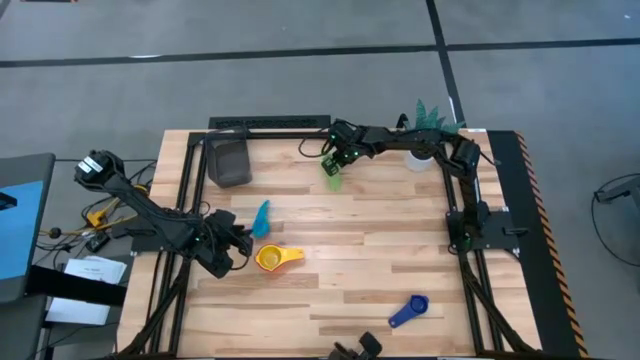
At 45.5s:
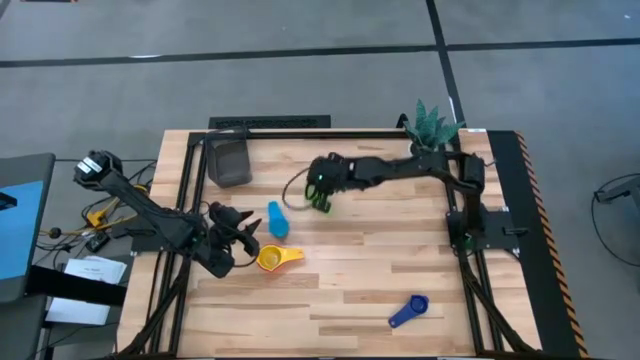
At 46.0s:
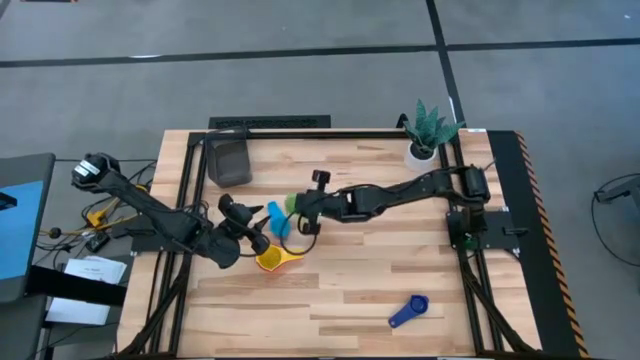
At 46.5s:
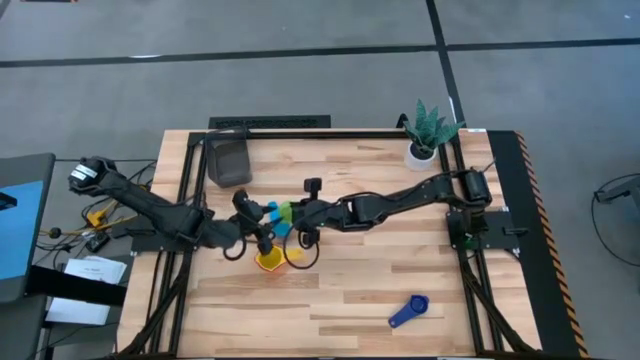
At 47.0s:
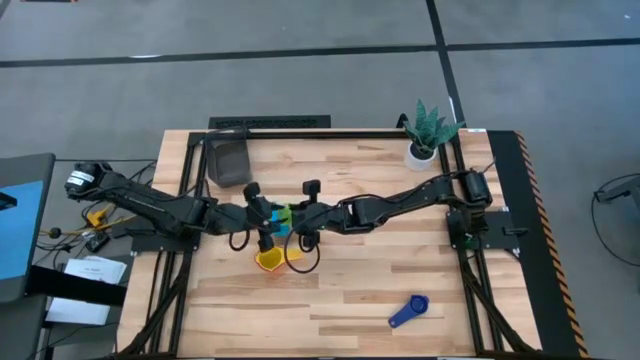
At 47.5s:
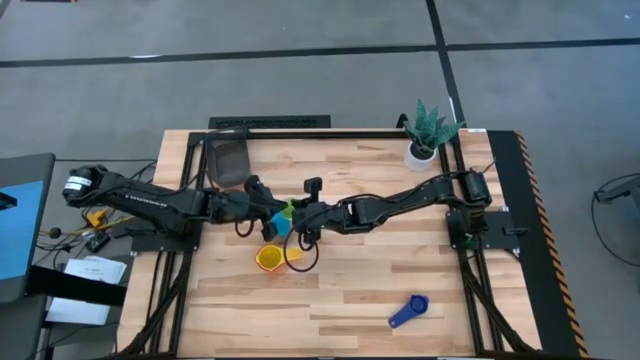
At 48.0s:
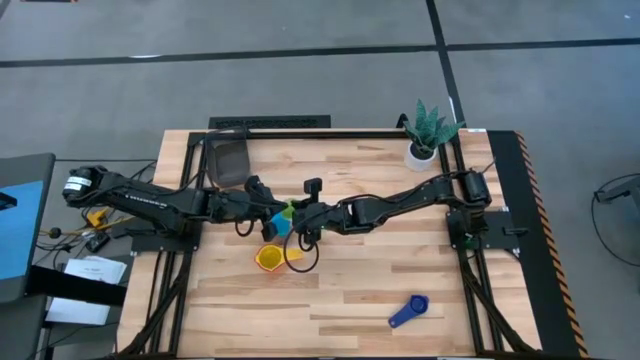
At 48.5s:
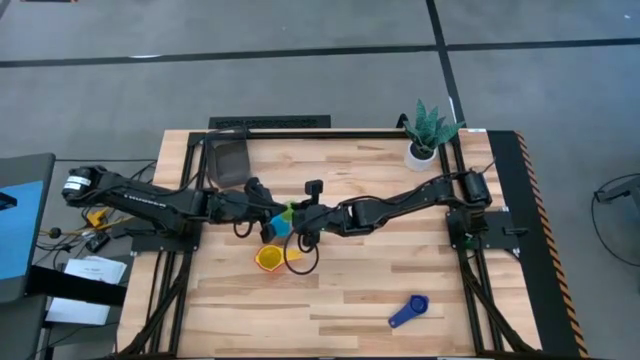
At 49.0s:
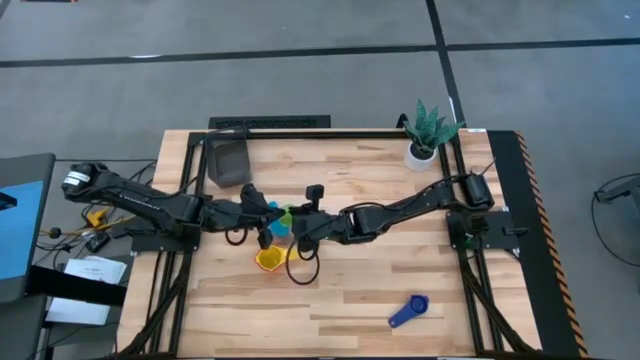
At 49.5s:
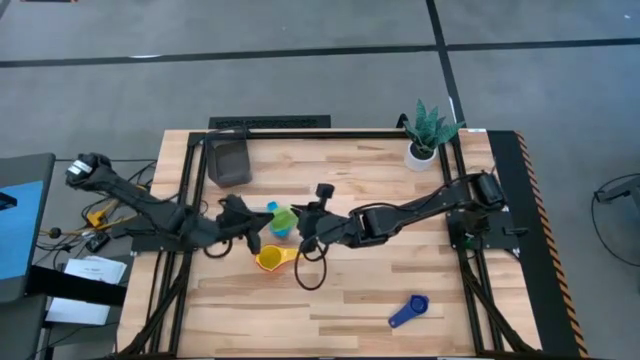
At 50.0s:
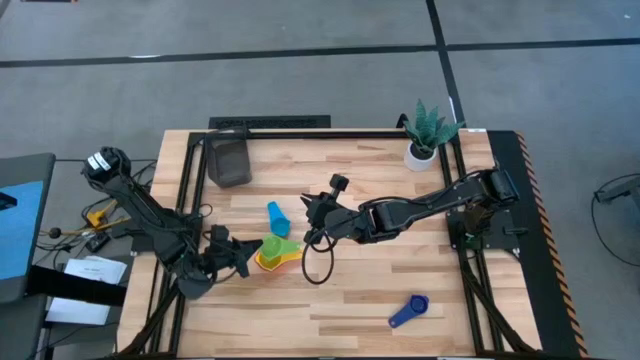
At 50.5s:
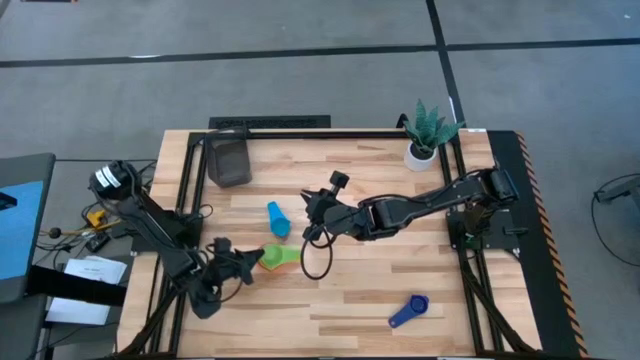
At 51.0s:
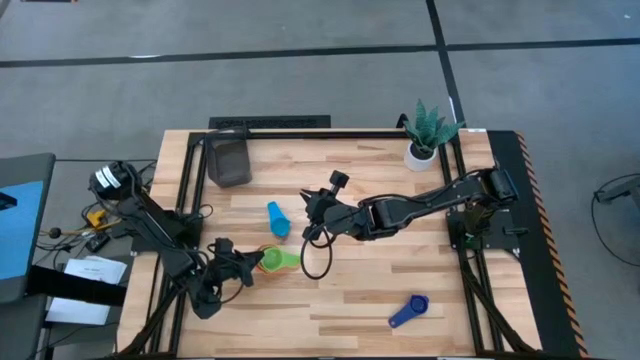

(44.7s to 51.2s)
Task: Nest measuring cups in basket
Stack the green measuring cup on top of the yellow measuring cup

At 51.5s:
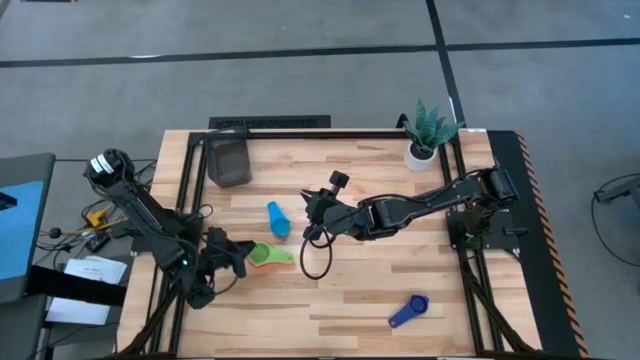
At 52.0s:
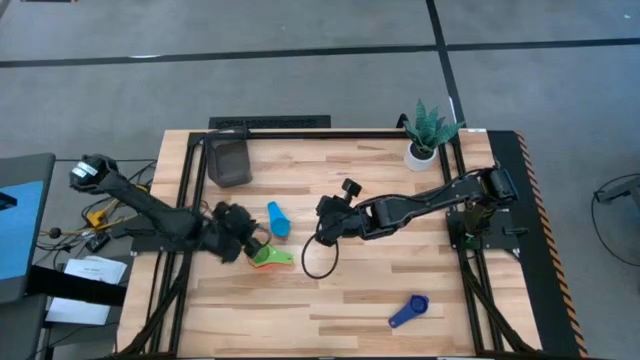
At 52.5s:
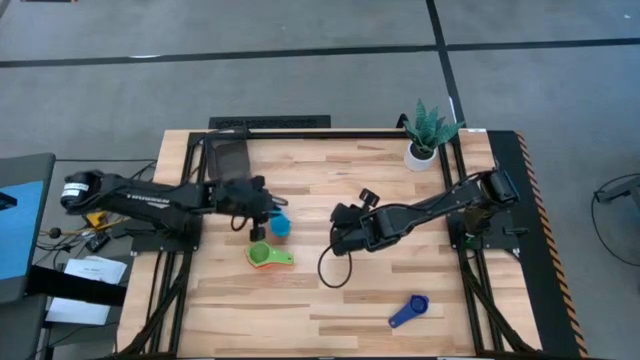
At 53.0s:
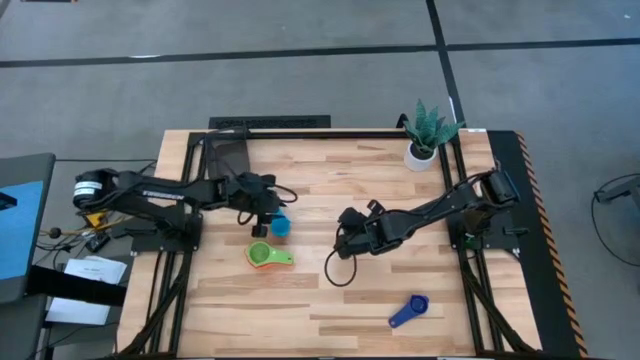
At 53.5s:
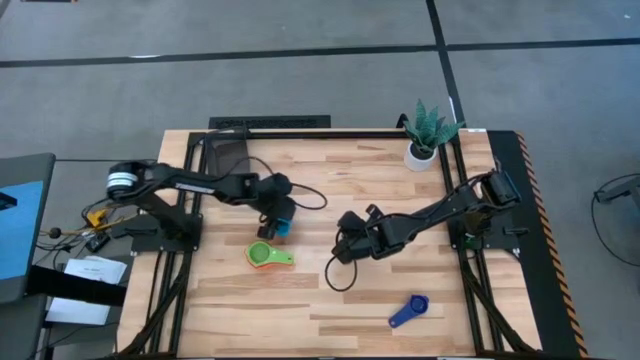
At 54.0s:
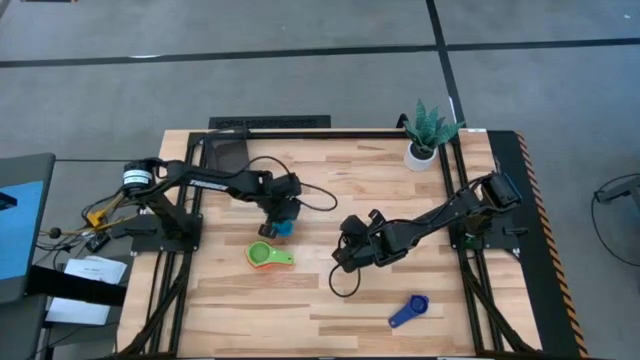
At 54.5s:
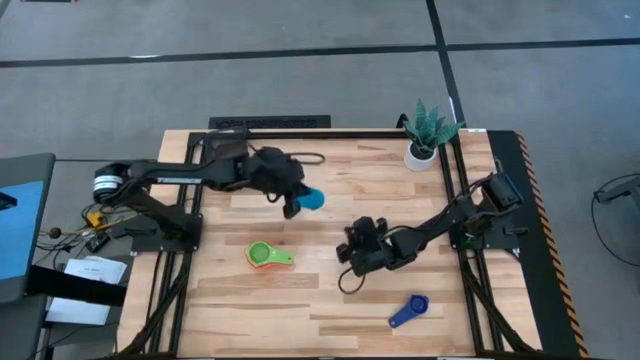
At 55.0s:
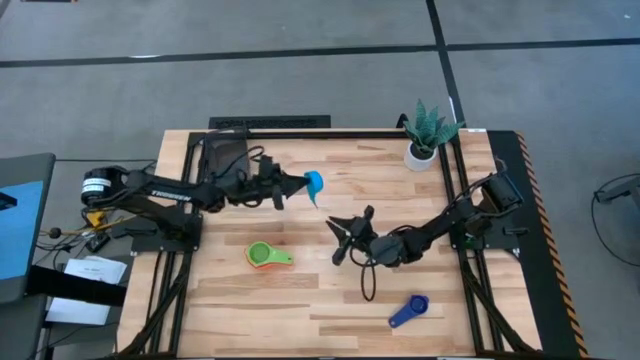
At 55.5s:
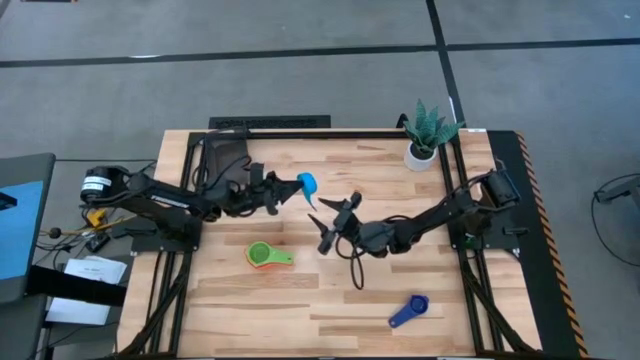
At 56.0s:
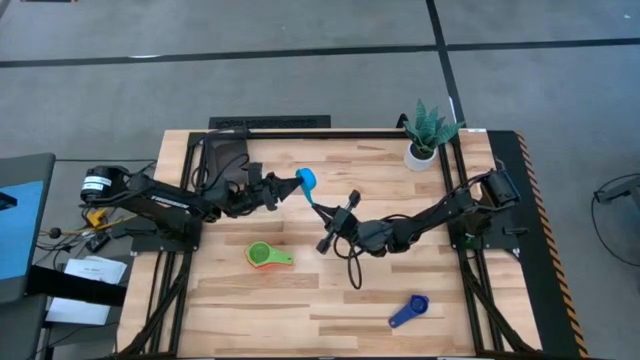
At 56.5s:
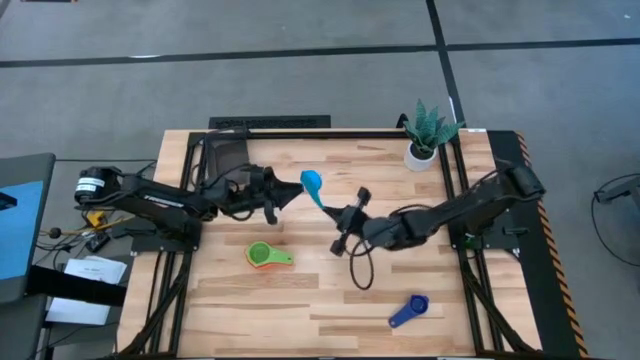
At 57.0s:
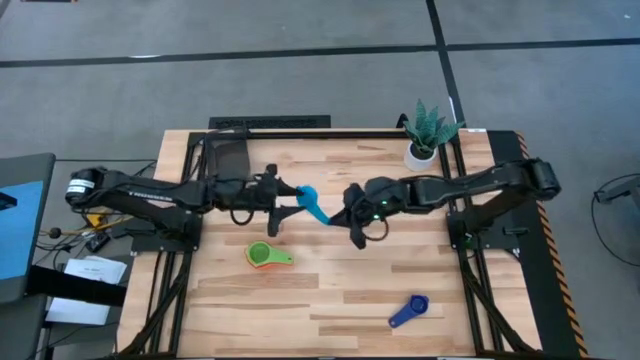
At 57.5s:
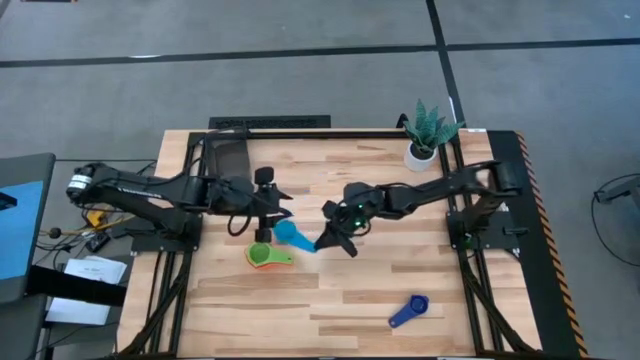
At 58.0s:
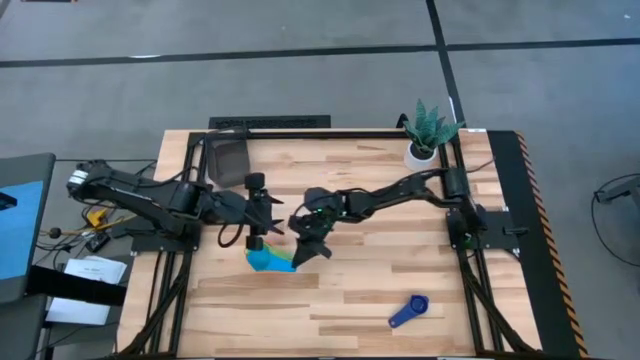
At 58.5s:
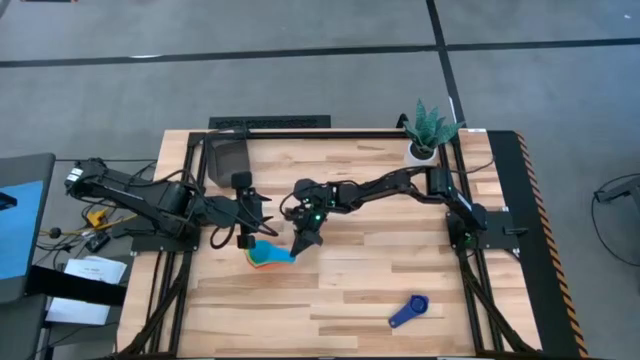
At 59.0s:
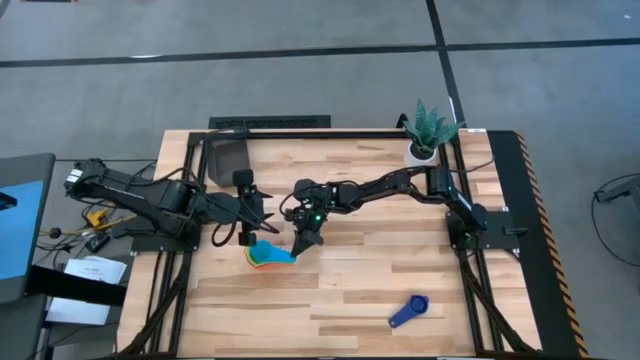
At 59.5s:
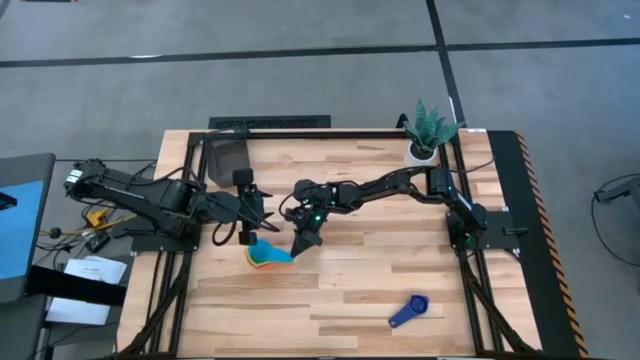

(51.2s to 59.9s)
Stack the light blue measuring cup on top of the green measuring cup

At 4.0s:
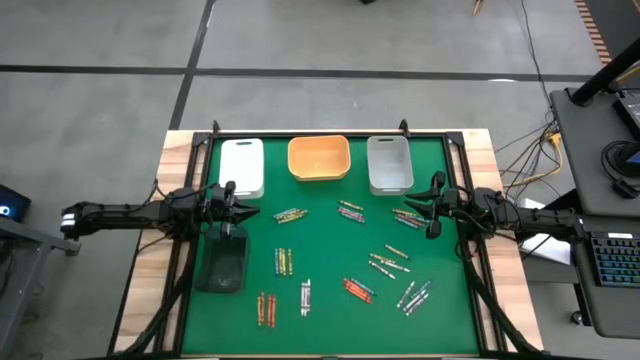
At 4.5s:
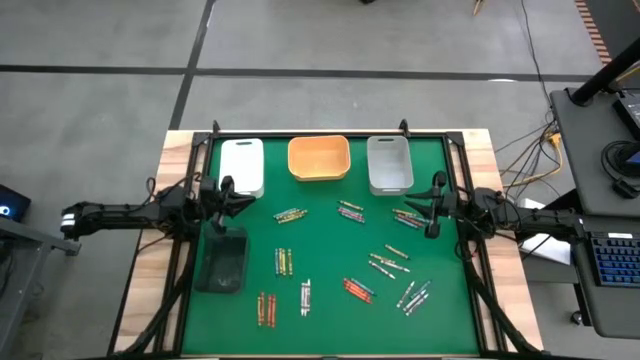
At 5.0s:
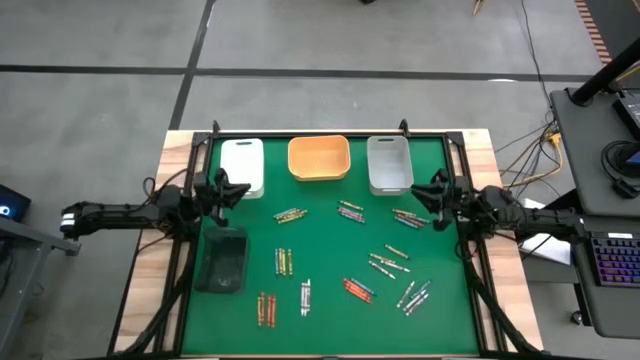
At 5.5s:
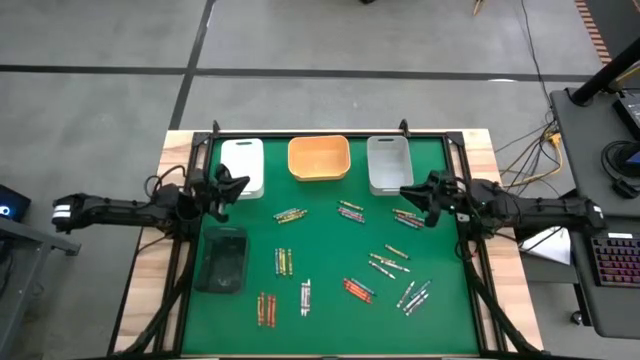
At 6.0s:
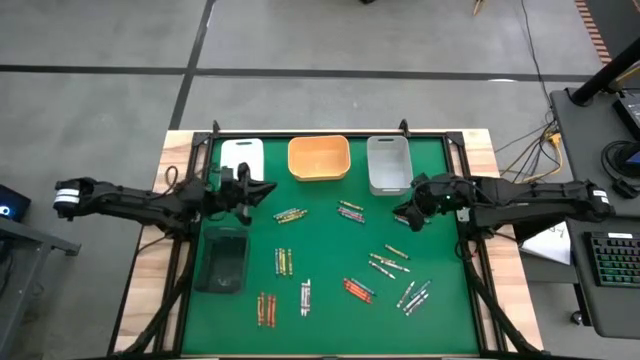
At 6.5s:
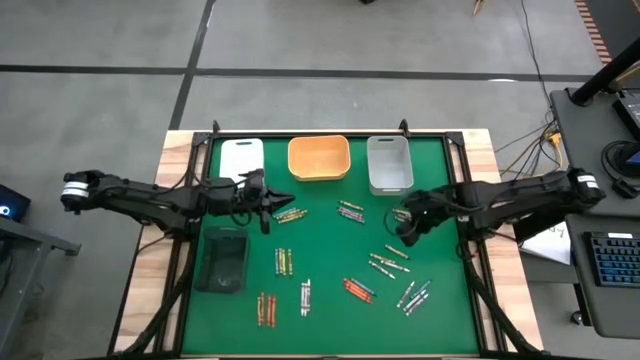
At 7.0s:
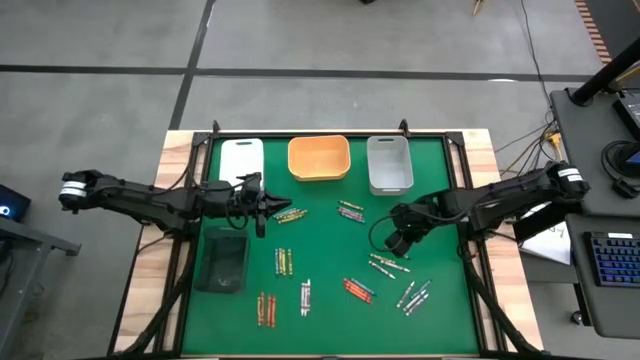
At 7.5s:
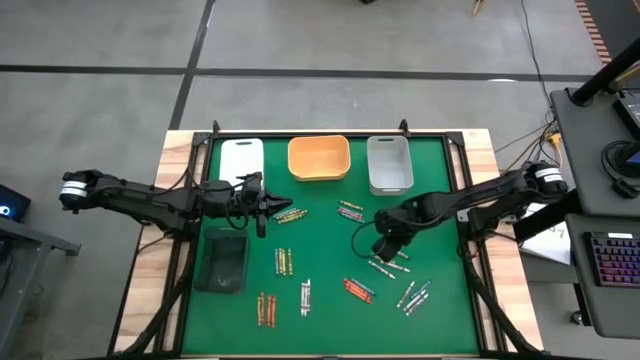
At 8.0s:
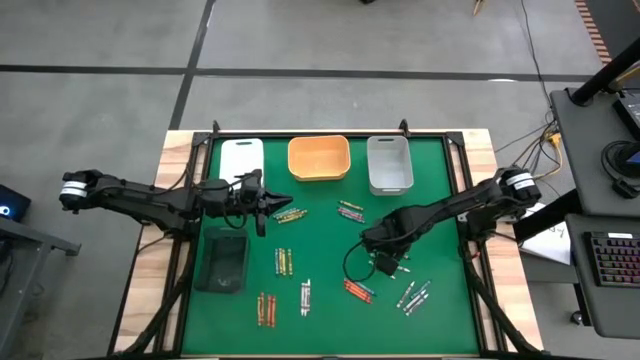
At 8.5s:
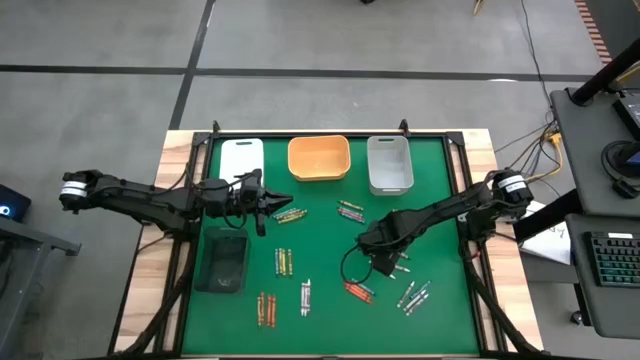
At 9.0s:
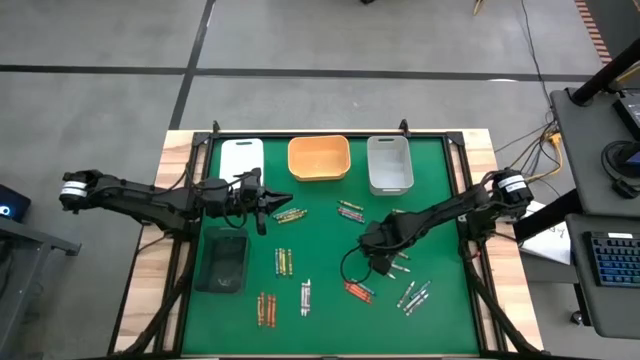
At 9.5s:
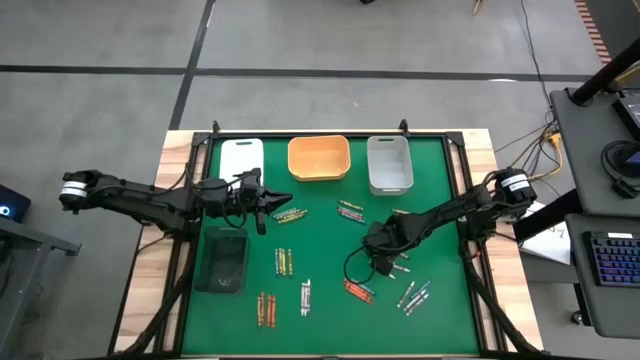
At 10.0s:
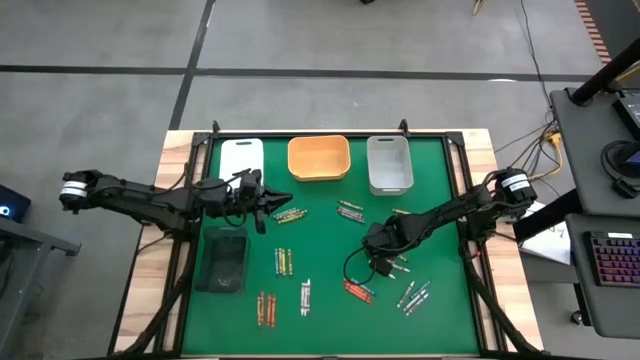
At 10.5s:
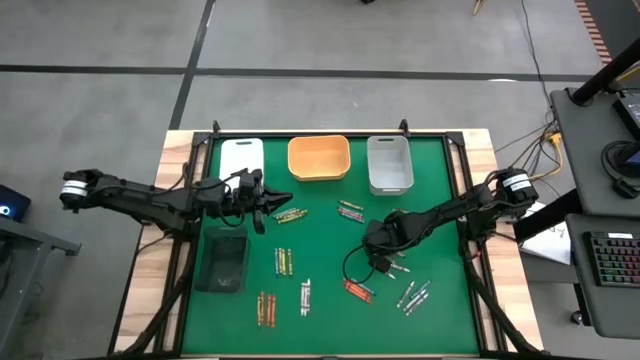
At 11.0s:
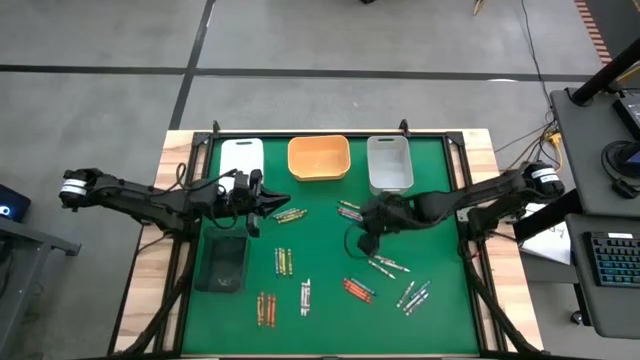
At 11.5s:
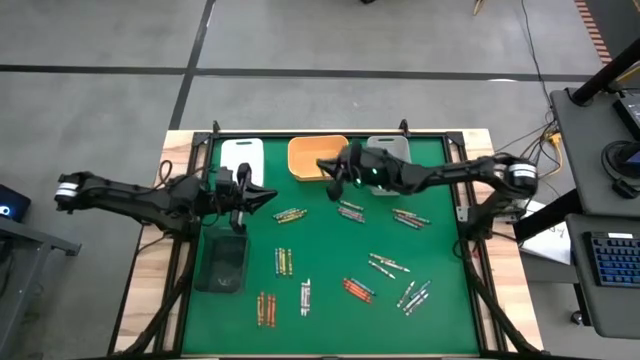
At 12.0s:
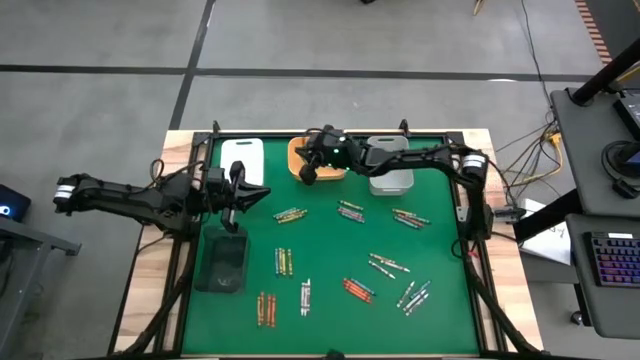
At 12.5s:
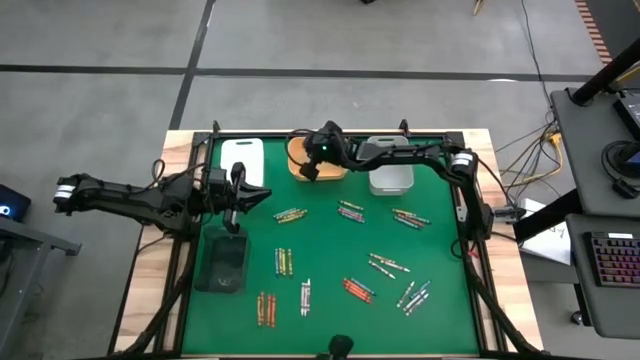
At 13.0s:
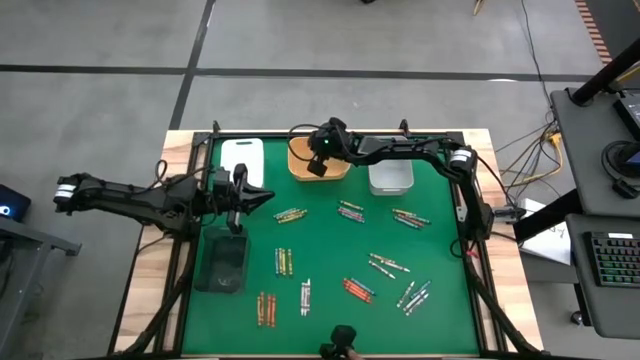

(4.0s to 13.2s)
Task: Sort crayons
Put the green crayon into the yellow bin
